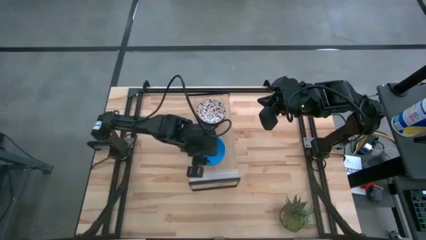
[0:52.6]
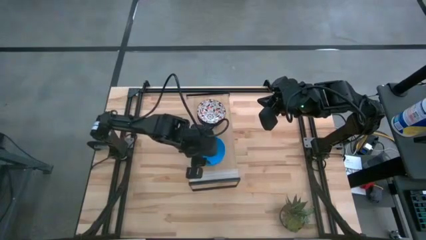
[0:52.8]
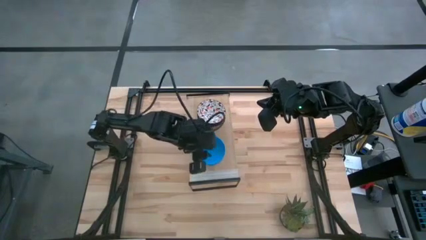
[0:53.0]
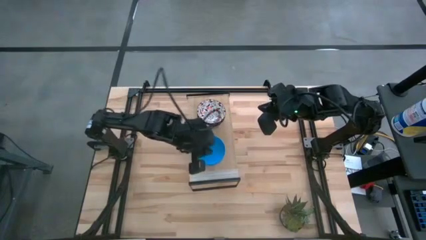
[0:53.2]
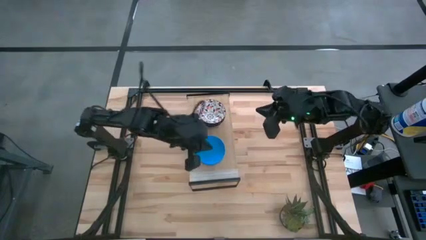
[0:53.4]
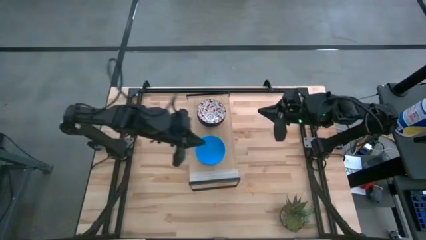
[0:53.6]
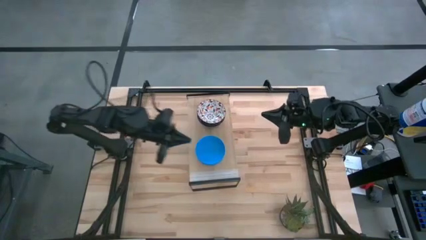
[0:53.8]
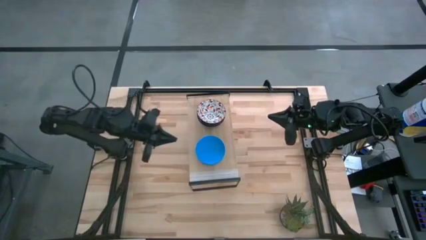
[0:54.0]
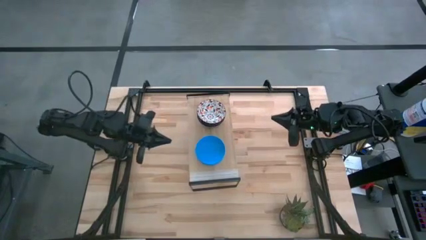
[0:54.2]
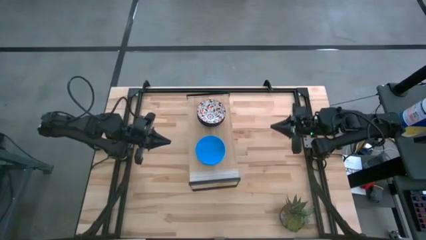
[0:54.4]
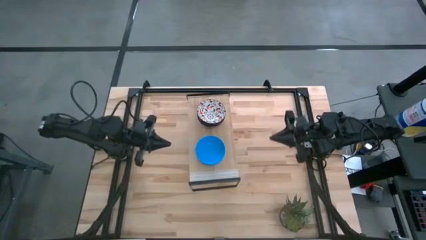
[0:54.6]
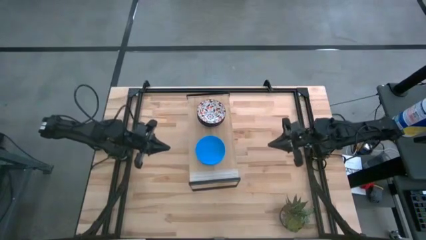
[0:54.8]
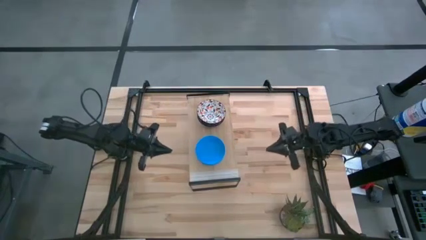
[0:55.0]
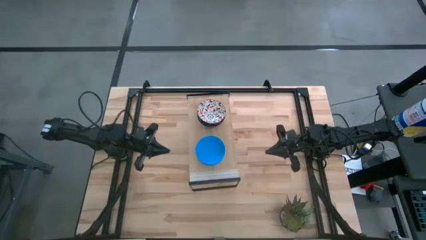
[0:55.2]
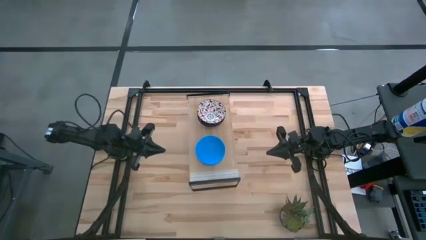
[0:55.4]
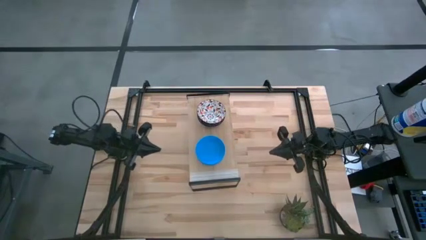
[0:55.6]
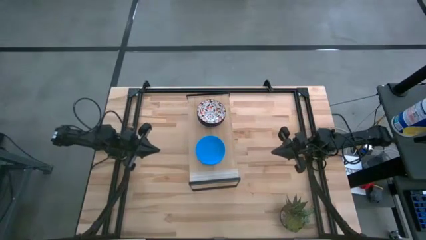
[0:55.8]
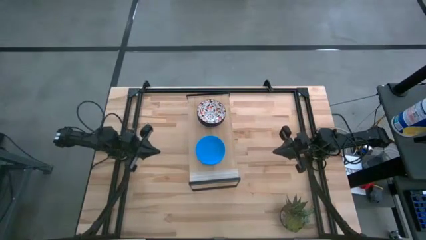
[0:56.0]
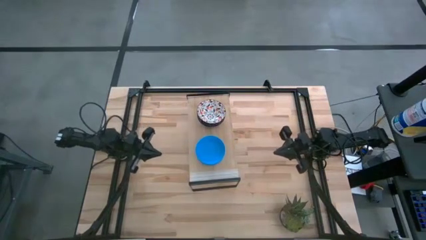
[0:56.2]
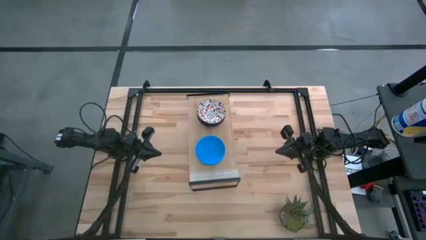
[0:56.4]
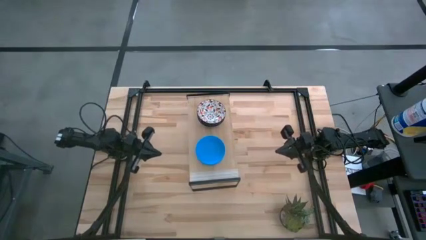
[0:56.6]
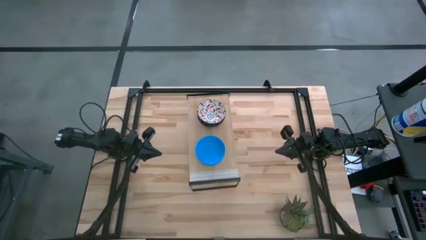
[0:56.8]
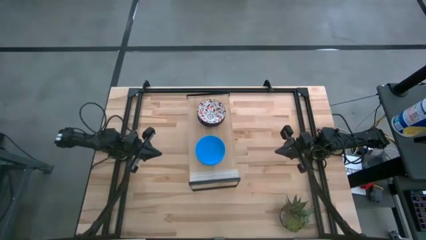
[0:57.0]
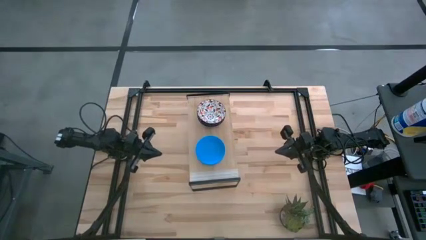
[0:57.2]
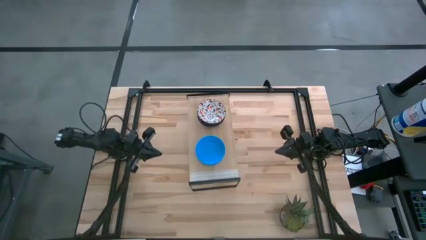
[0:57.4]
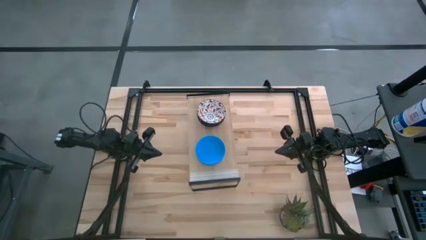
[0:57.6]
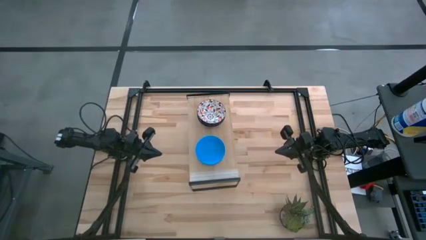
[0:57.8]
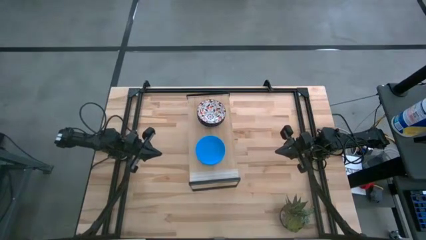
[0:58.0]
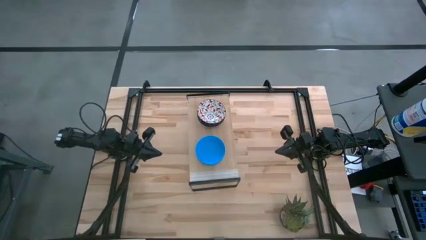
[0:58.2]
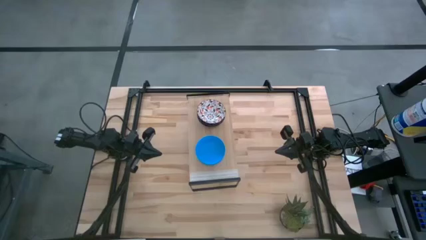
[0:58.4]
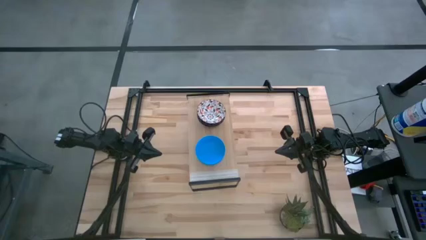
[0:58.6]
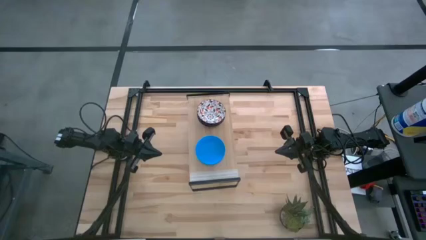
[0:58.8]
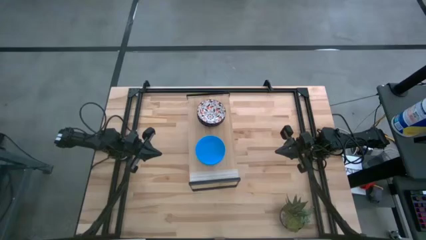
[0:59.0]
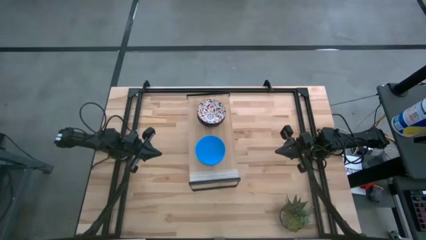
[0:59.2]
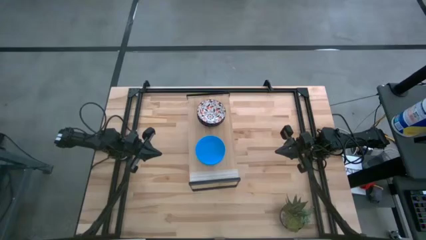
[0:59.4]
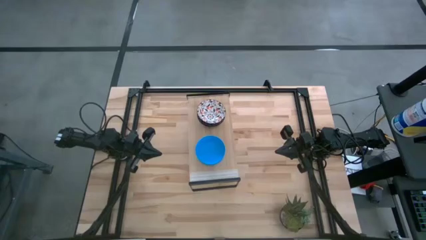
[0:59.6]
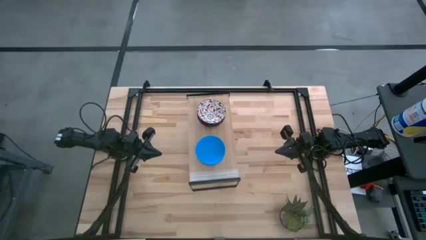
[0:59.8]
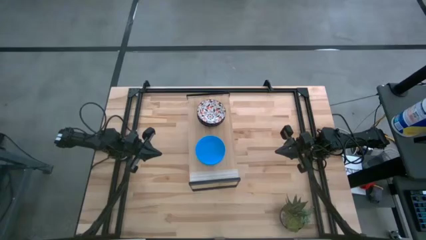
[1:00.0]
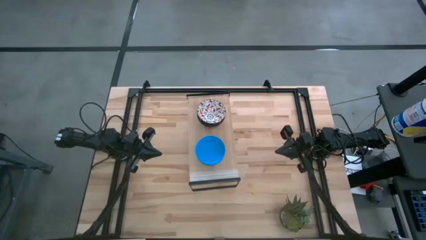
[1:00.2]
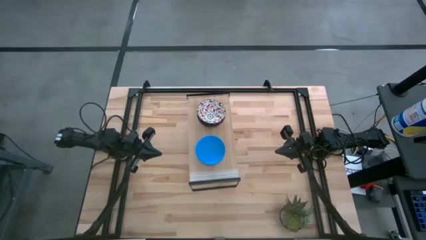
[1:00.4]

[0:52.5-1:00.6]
Task: Pick & Place Mini bowls
Return to Home Position

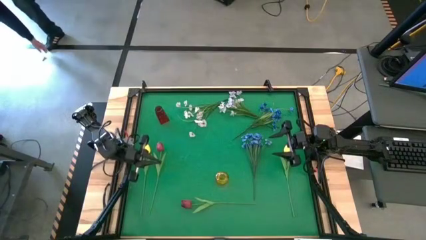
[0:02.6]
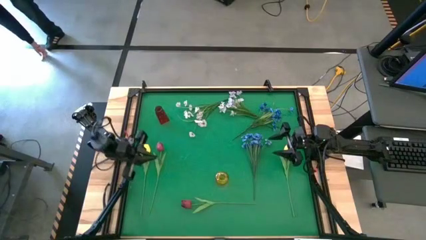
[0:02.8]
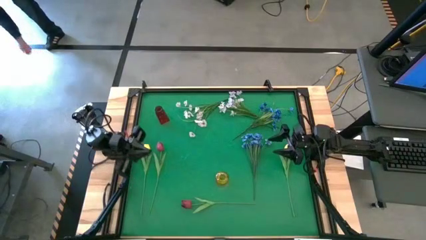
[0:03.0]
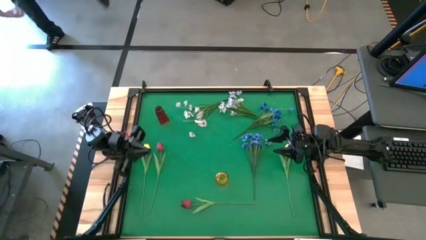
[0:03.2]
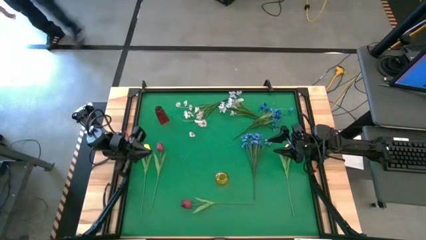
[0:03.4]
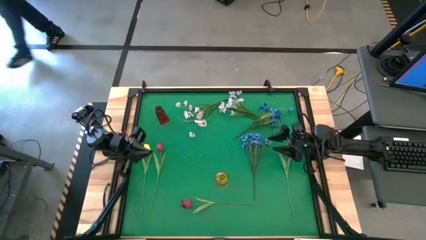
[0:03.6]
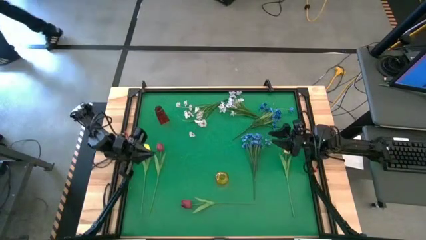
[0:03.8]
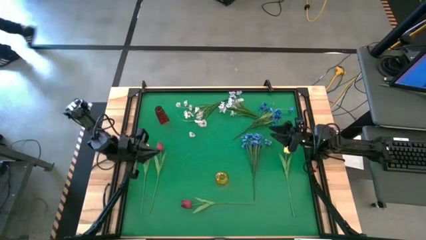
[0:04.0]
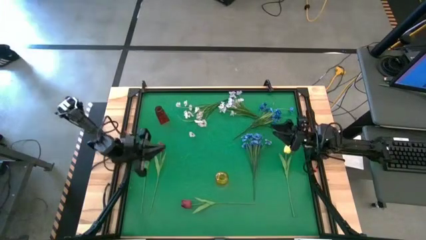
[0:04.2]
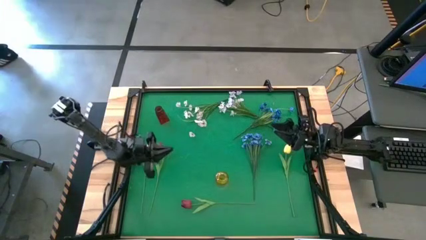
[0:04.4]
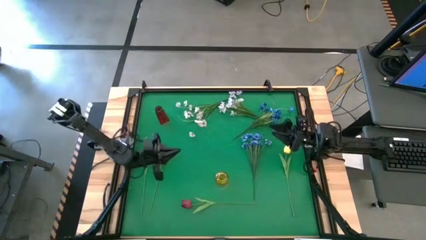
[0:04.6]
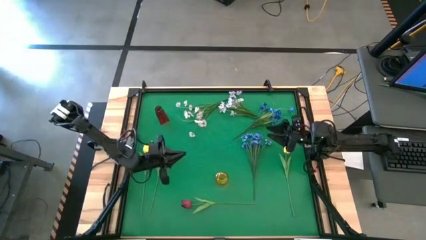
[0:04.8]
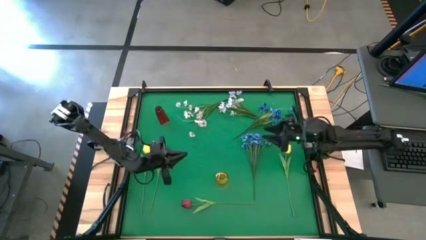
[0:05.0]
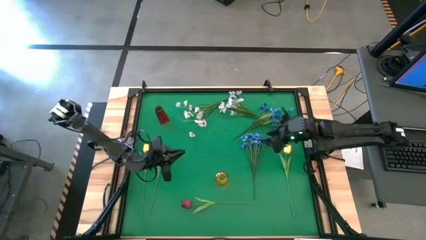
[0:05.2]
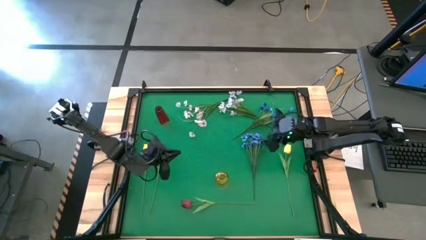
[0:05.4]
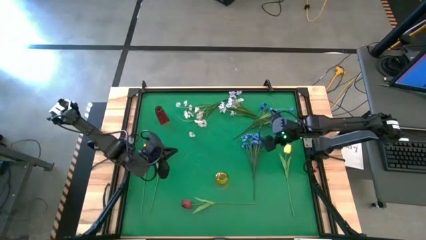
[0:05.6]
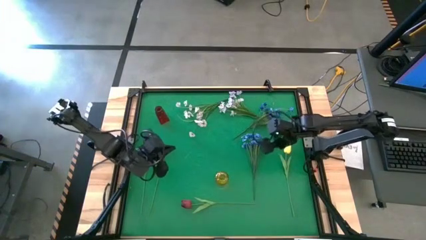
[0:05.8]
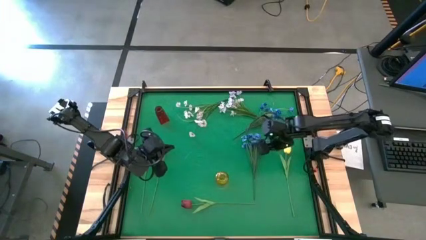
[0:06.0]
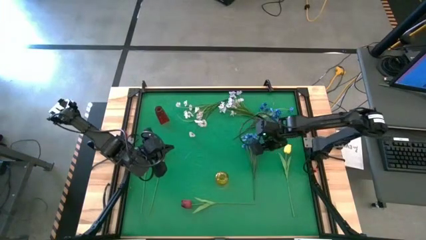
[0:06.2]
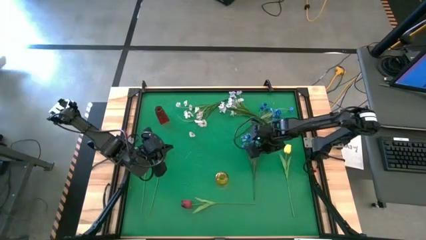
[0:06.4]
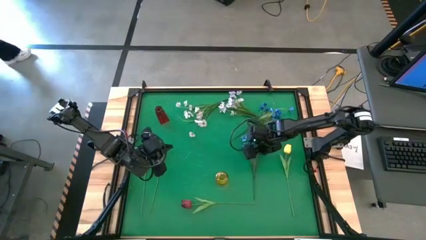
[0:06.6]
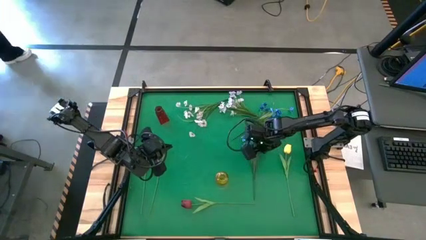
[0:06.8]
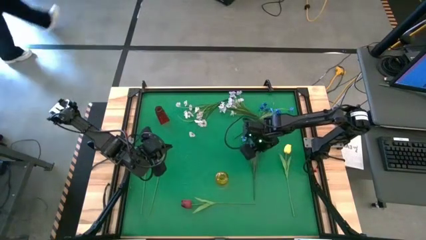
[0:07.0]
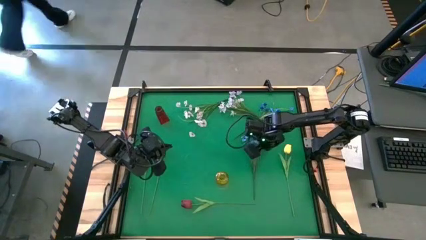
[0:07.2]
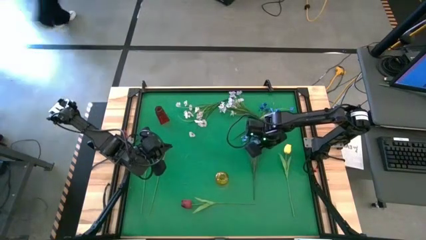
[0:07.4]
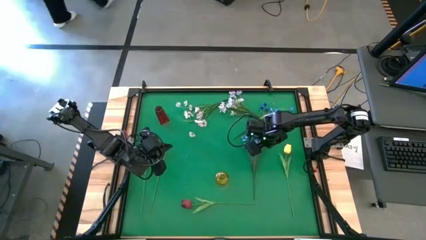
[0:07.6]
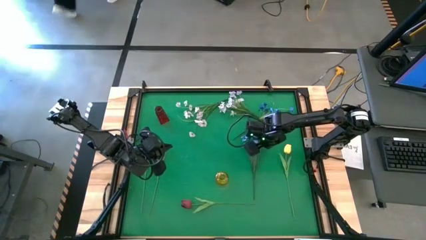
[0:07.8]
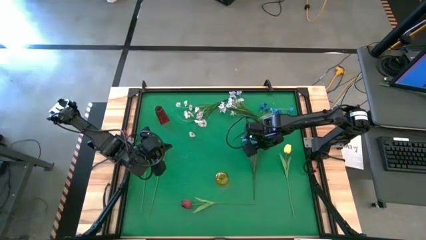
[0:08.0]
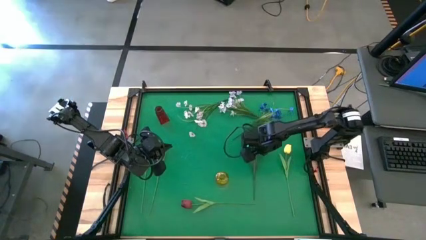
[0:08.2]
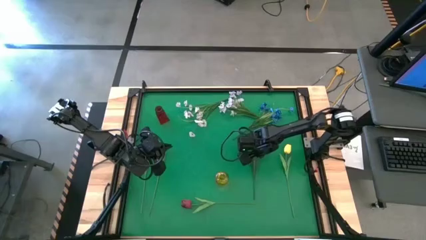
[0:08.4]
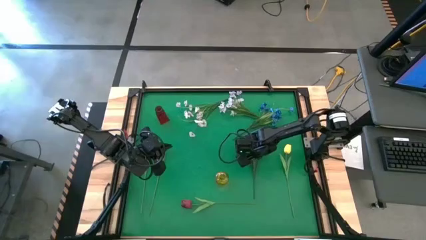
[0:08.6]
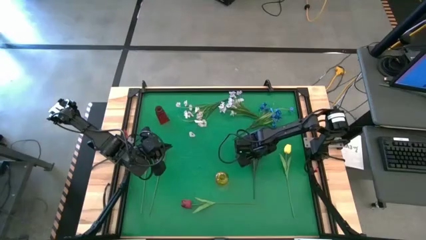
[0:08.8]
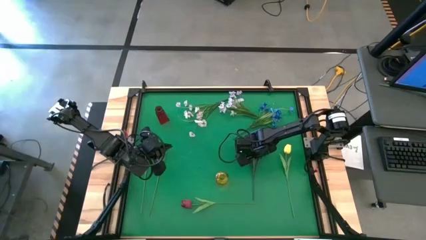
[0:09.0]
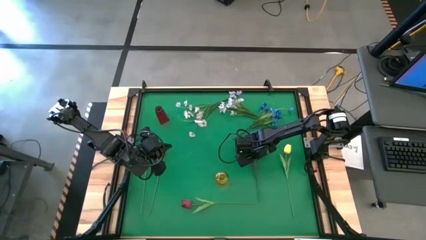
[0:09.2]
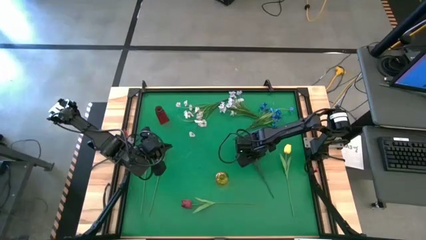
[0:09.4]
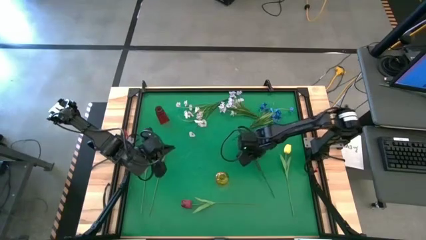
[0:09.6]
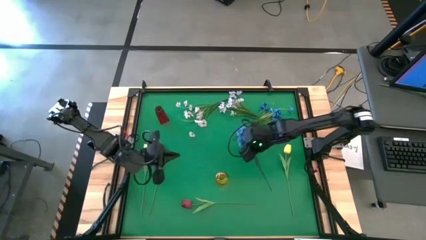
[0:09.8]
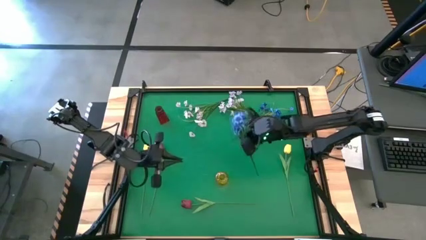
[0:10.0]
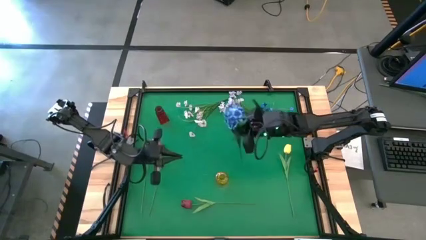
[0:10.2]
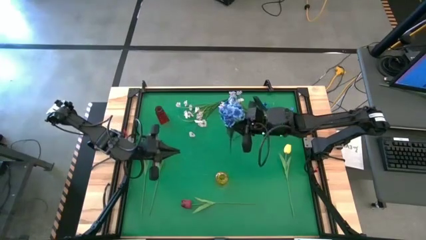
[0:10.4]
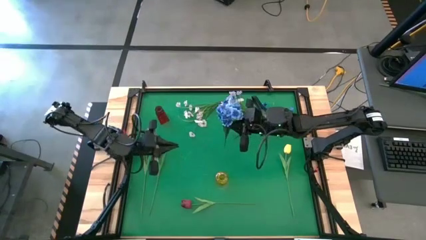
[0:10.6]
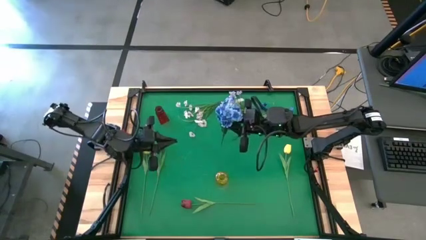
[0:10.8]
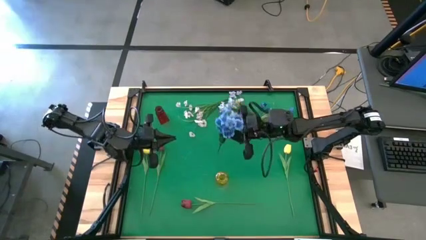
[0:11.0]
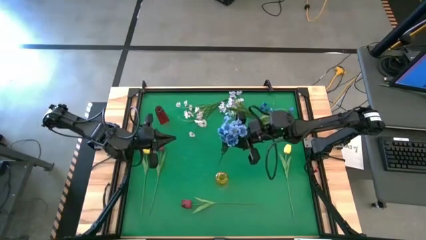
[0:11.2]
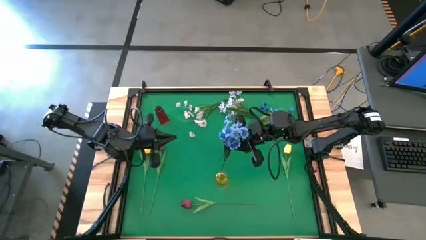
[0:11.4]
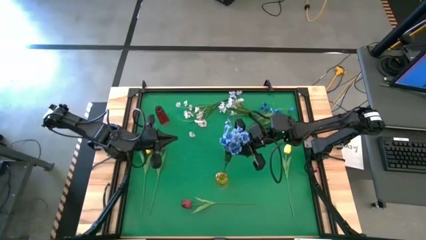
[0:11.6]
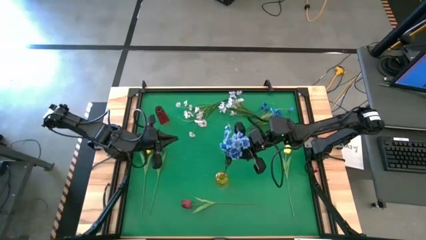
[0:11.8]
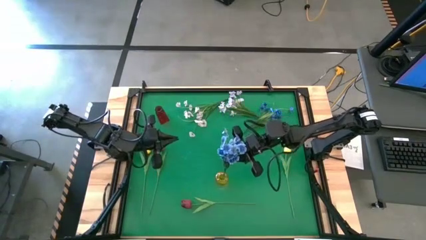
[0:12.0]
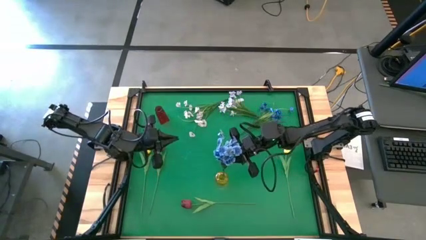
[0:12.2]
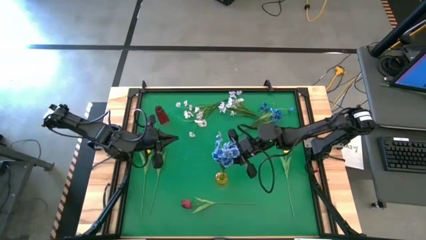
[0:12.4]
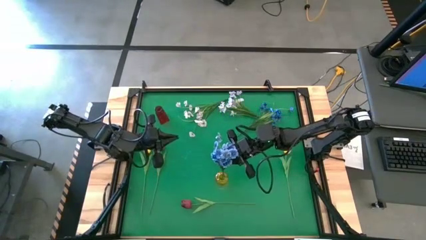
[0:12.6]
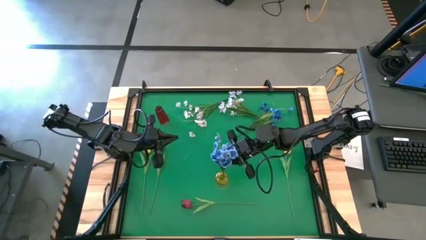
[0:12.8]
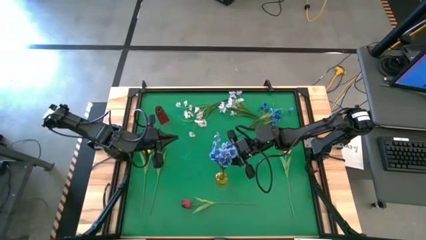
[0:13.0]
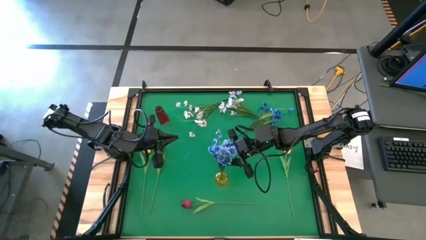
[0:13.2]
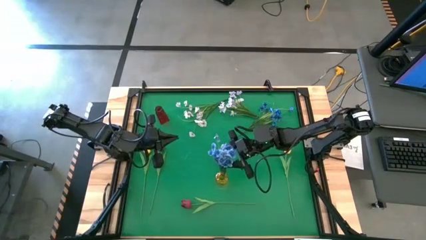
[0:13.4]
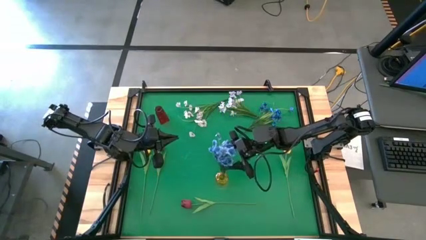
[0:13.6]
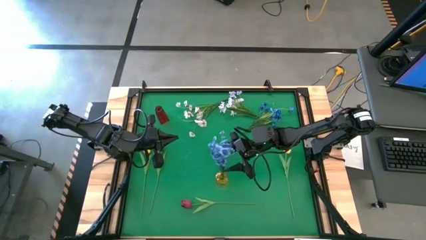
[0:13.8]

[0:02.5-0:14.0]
Task: Sort flowers into vase by color
Put the bottom blue flowers into the yellow vase
